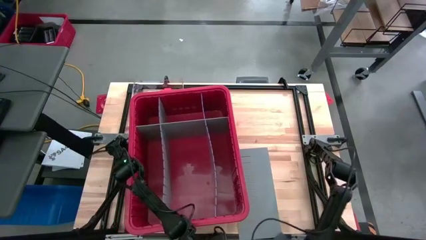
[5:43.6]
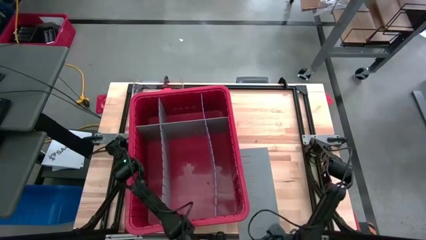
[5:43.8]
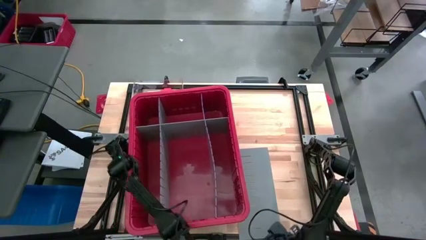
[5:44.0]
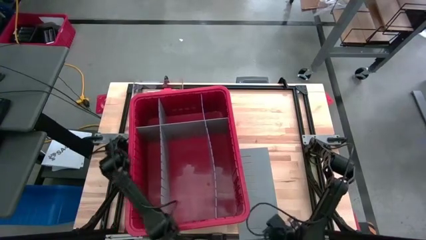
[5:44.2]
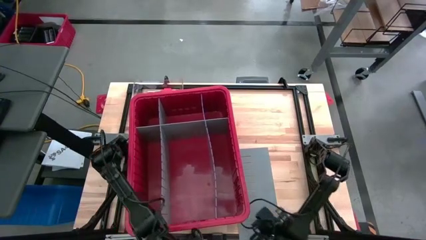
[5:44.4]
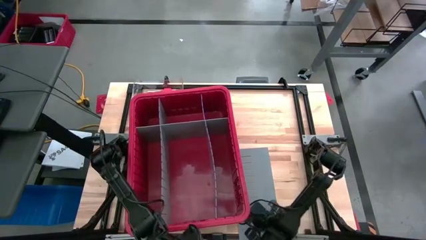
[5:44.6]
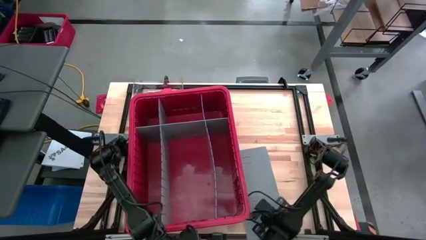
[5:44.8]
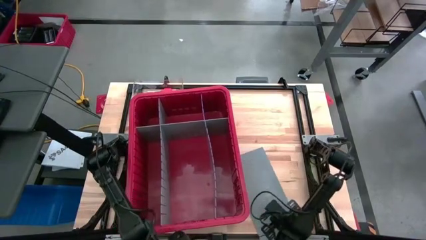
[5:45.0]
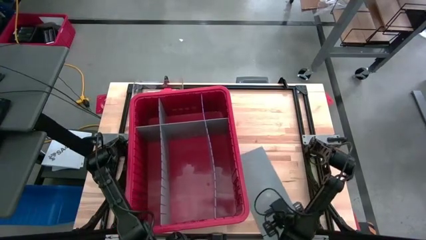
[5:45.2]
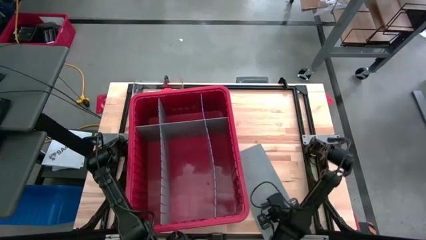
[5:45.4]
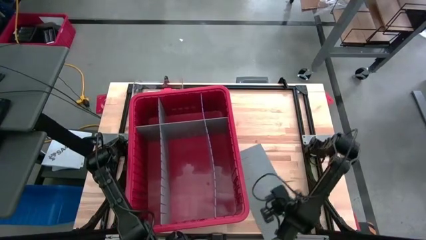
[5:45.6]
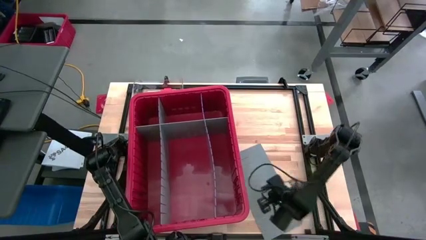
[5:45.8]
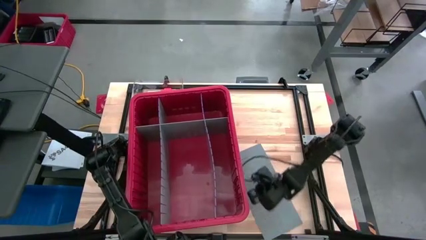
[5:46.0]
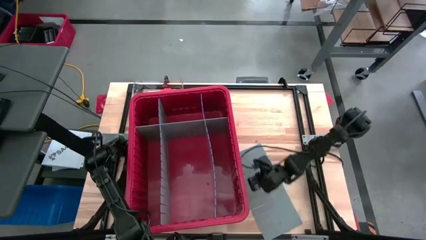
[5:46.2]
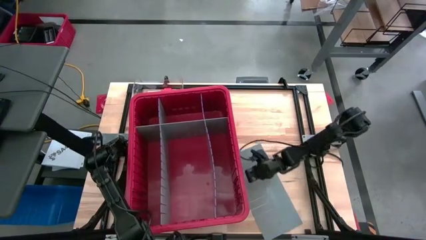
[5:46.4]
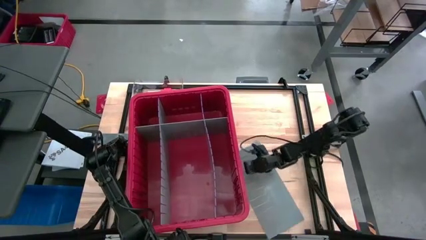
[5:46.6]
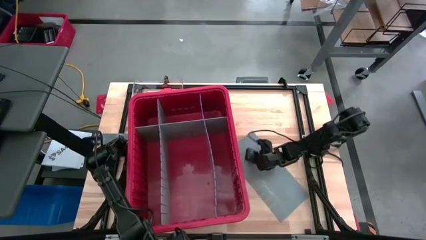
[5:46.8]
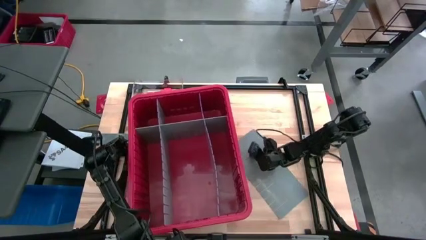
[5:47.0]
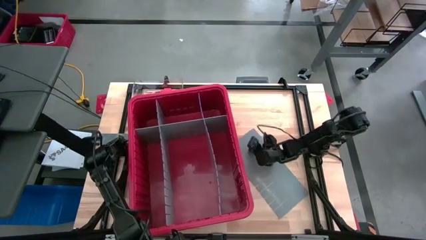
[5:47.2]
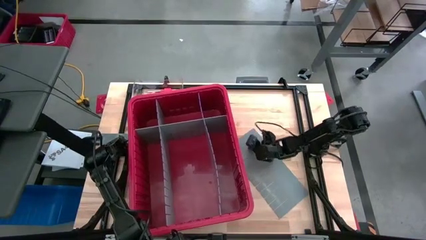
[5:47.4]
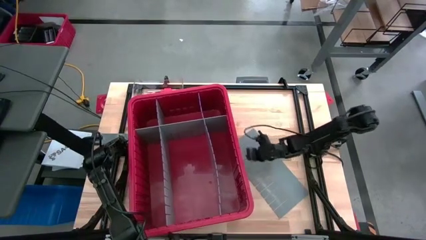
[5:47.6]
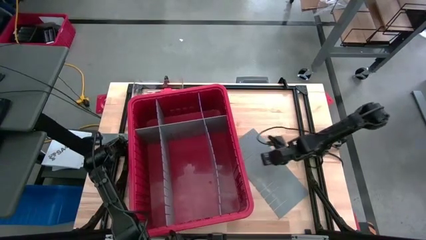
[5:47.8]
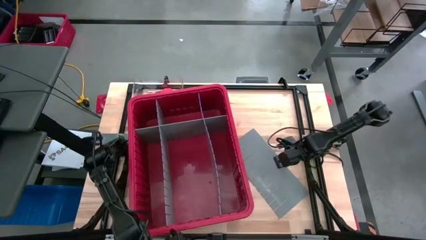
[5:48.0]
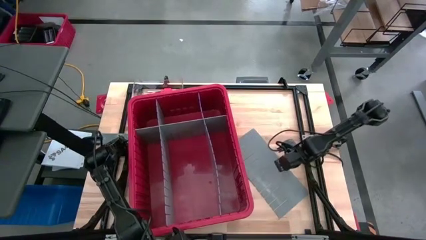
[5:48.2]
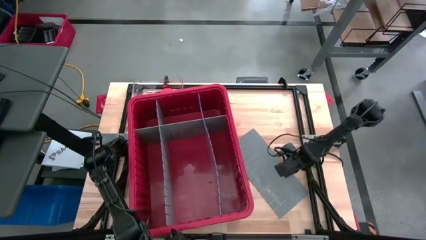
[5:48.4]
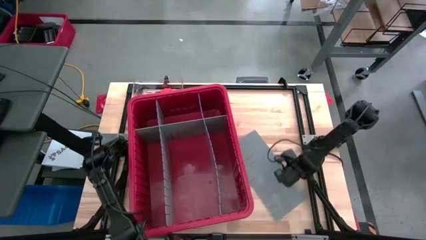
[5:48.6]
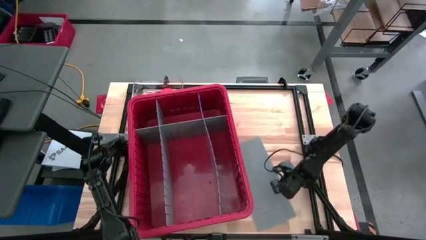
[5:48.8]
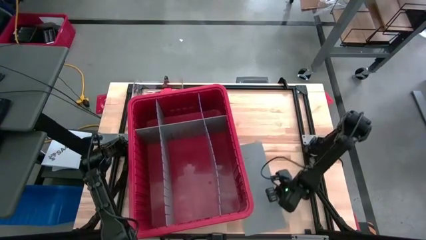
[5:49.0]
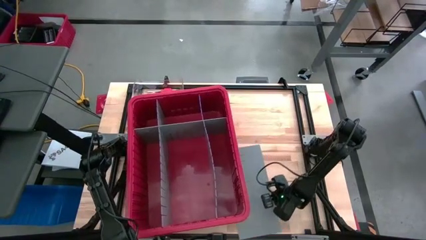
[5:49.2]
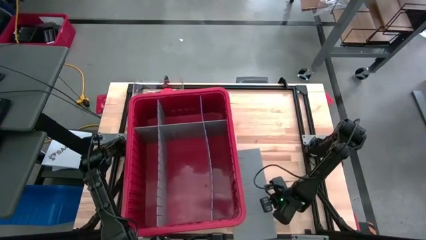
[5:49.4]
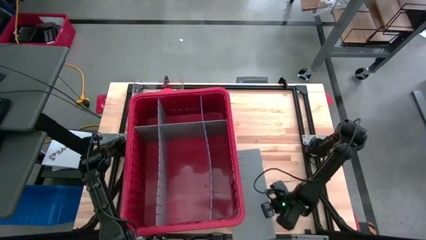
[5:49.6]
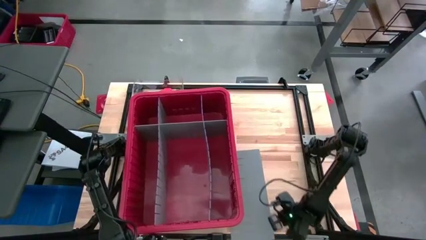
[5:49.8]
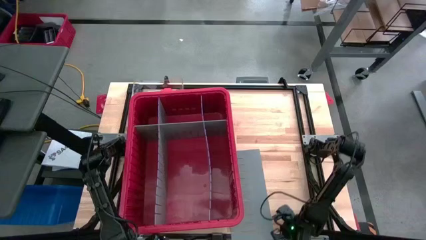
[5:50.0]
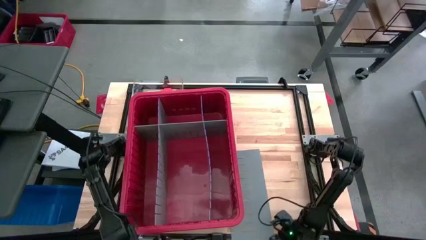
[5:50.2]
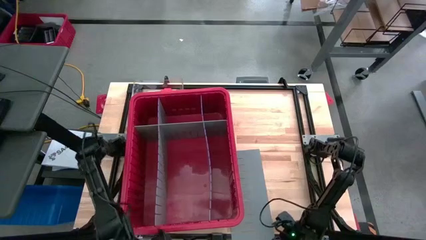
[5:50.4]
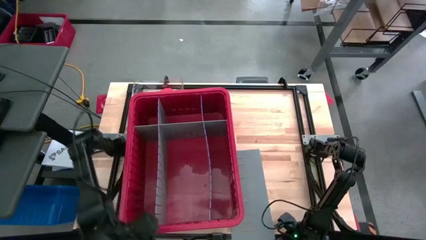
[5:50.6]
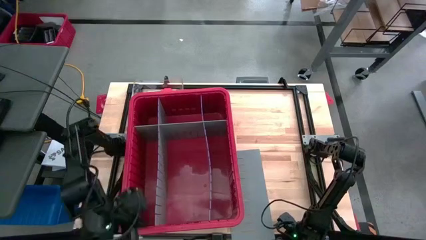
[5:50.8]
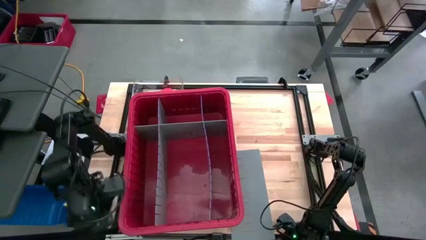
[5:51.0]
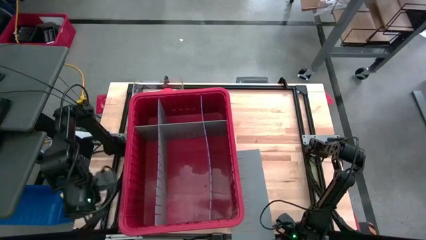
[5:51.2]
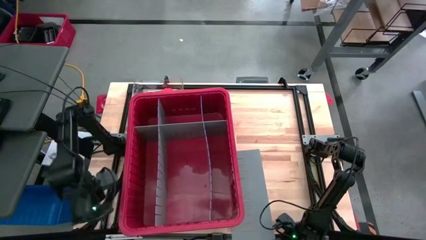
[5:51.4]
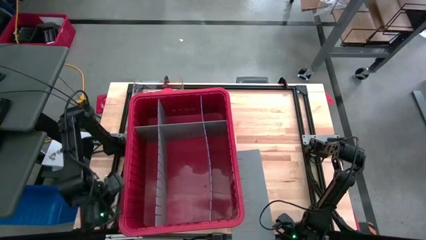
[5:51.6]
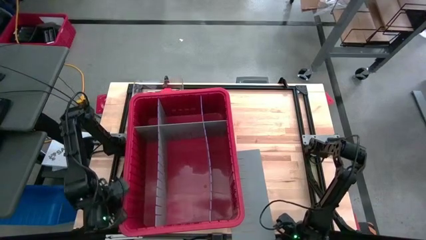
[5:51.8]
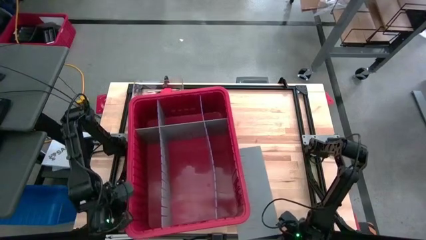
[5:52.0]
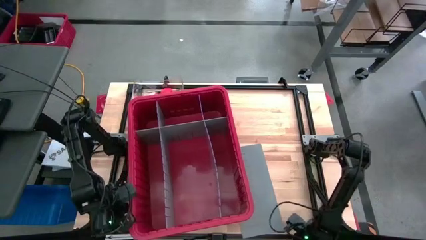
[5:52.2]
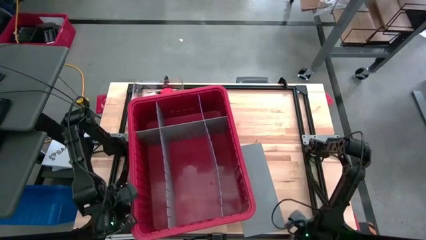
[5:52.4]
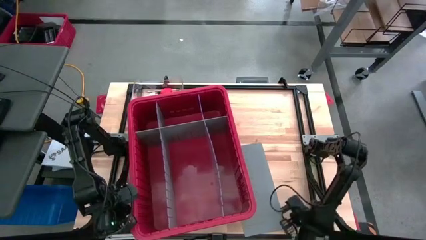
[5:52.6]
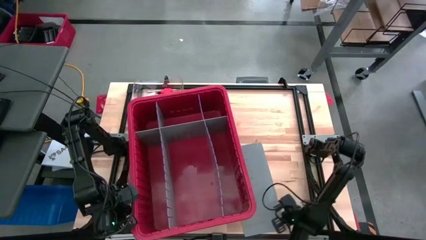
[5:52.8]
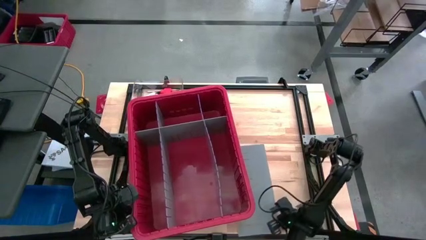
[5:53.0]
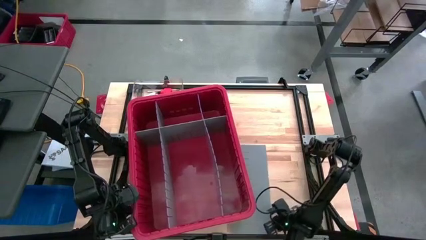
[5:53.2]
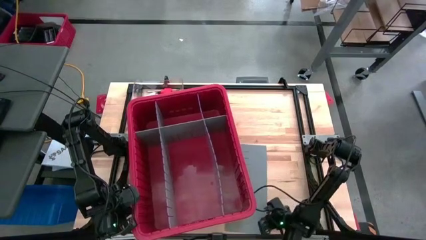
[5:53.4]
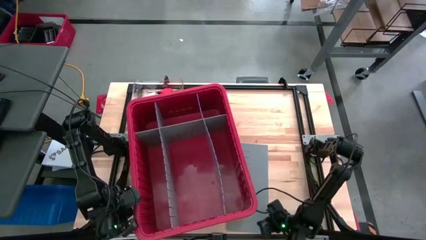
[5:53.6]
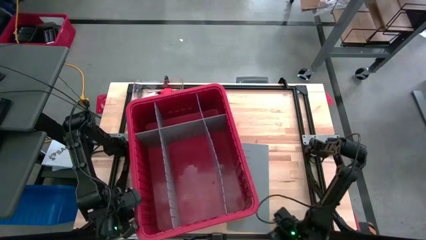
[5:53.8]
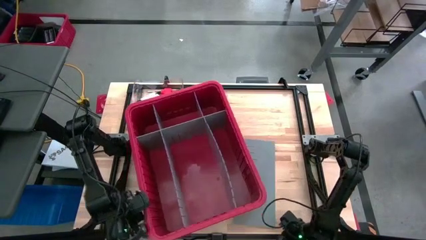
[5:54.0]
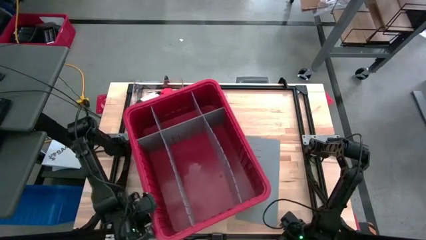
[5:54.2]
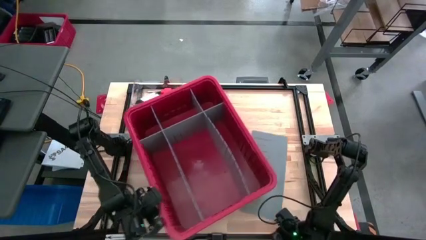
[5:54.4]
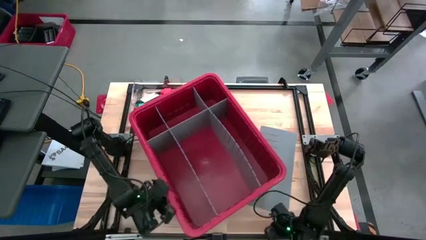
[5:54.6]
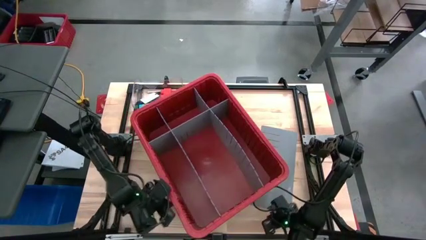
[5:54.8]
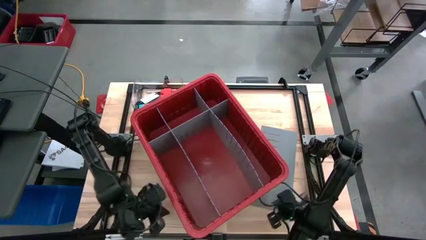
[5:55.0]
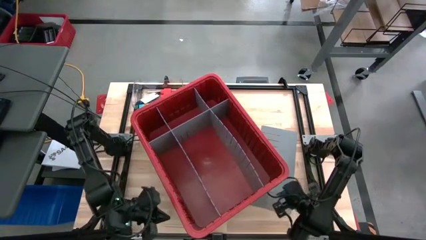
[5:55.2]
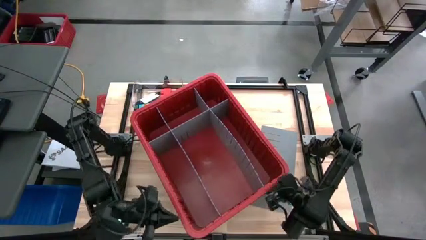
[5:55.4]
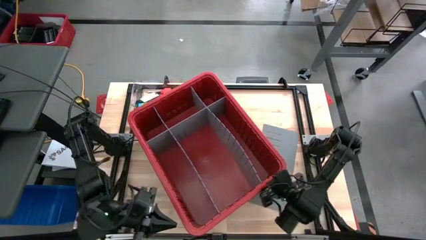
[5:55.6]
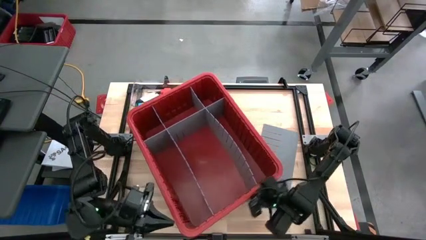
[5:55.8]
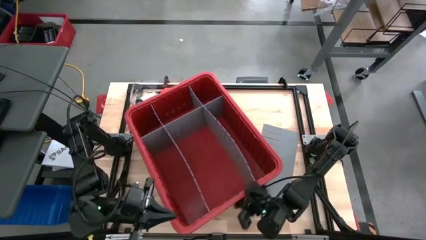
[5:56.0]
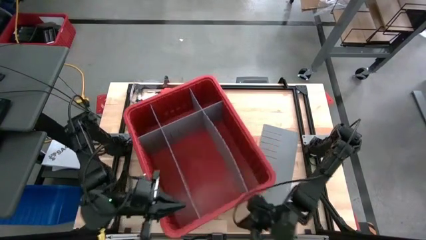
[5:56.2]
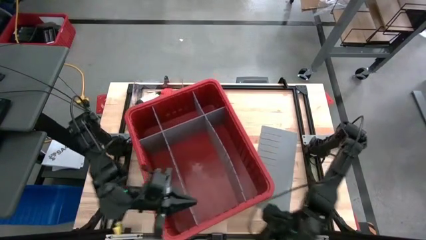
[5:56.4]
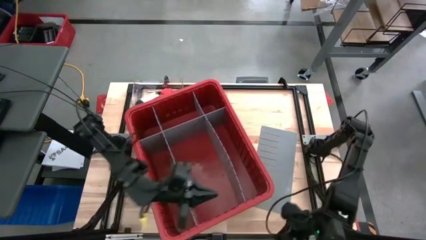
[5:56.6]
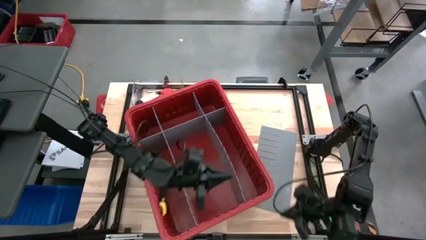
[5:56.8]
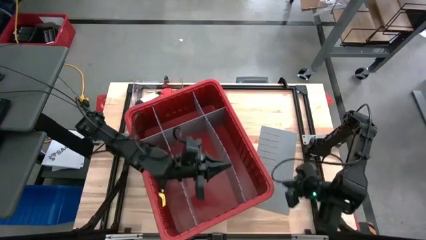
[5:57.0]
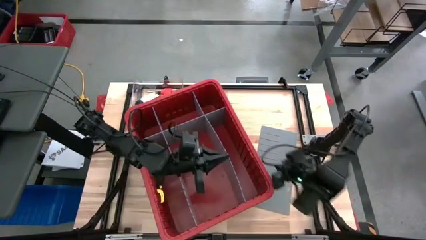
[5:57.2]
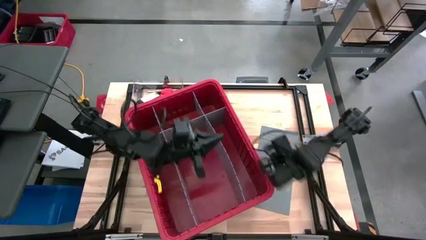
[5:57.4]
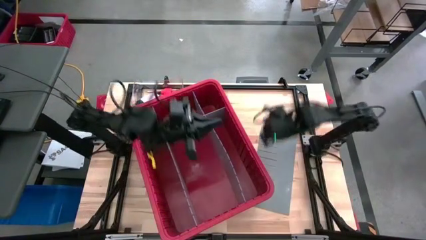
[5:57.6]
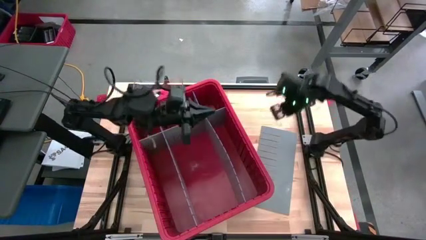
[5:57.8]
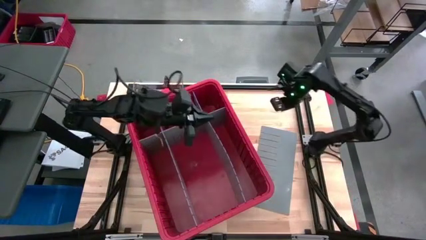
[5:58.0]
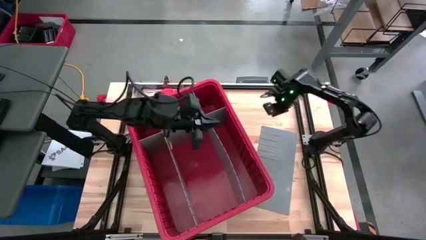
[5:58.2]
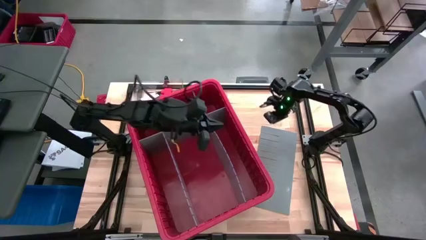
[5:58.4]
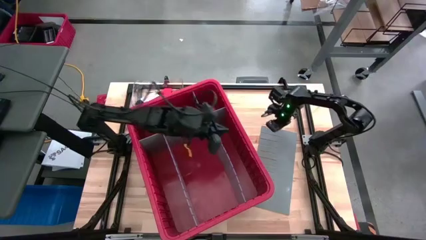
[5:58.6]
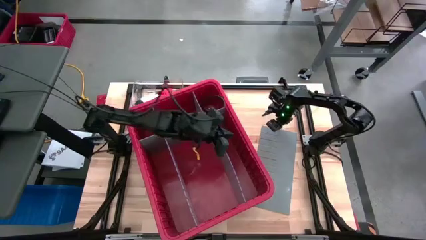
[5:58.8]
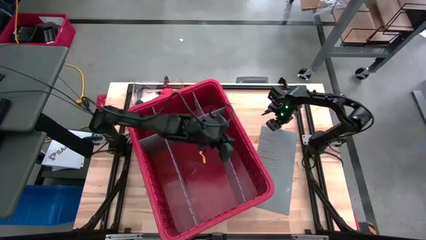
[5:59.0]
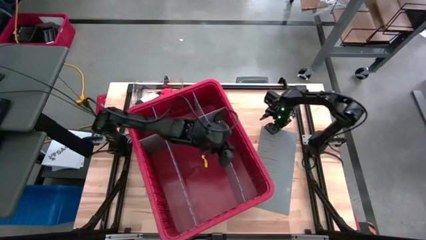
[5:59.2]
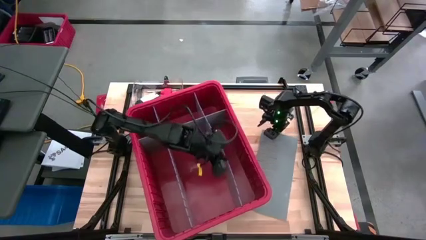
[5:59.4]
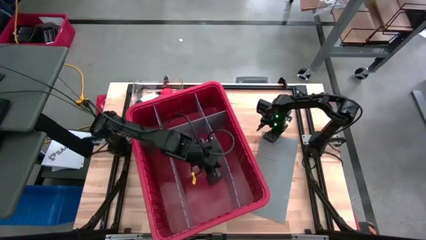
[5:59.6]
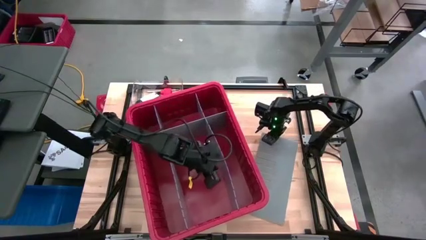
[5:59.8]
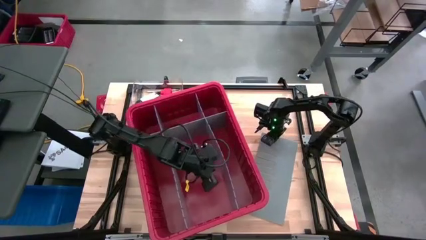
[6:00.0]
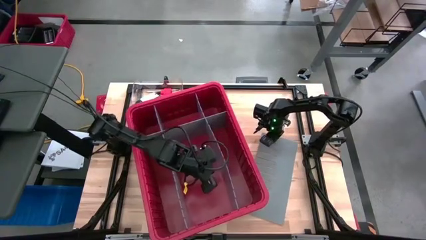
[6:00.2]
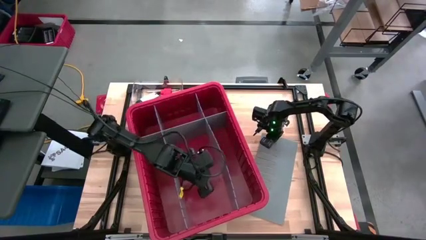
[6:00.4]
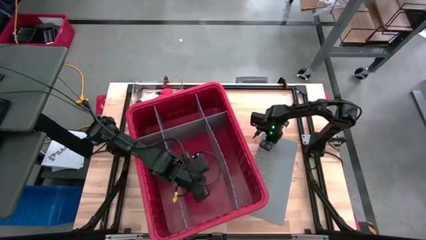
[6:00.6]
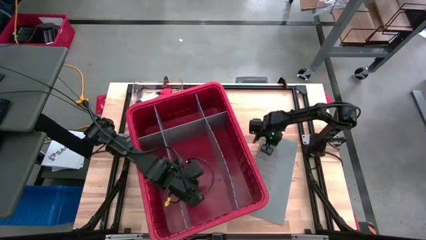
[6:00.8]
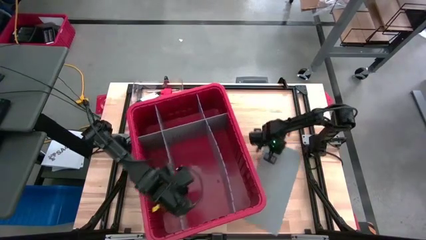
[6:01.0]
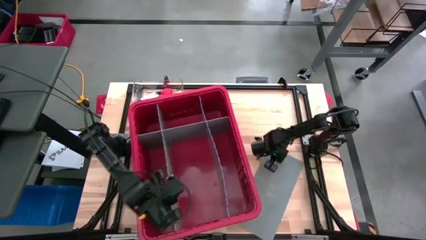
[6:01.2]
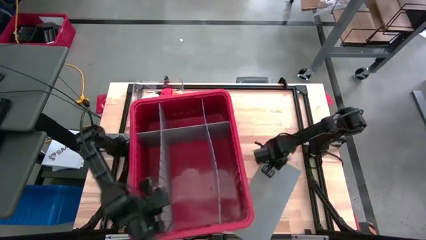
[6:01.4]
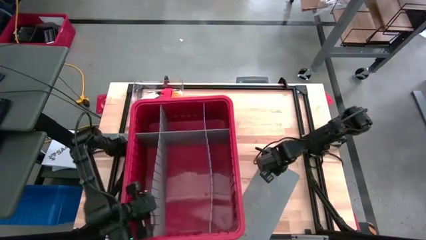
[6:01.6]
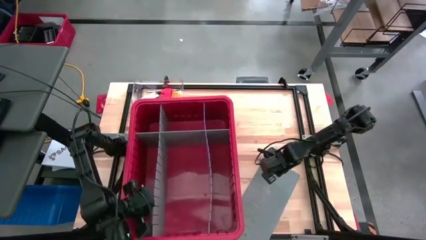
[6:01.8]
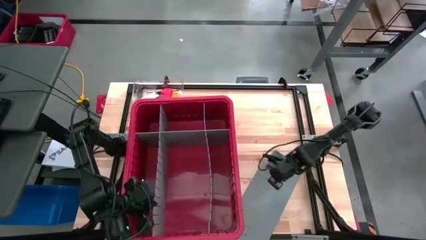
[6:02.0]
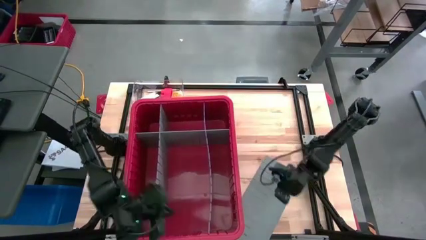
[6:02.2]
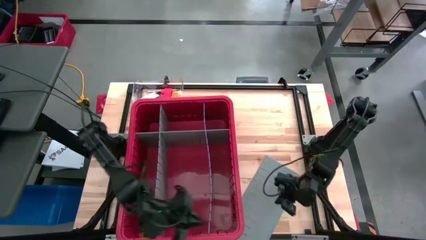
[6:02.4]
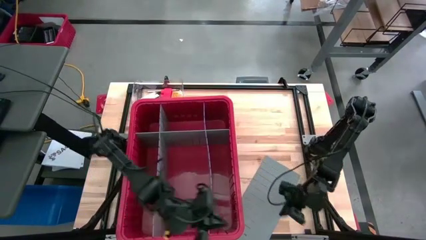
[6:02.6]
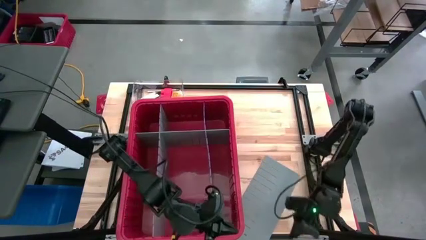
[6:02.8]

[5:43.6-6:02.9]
Task: Sort blocks
Assemble the bin divider into the red bin
